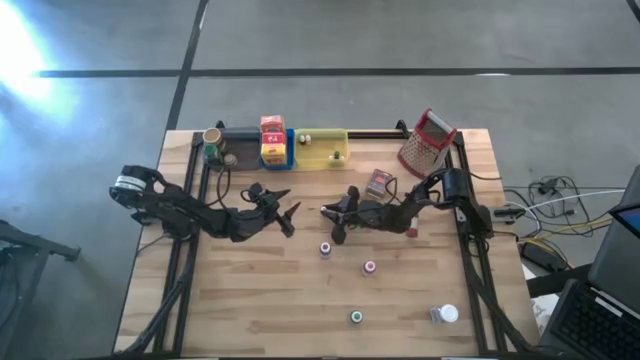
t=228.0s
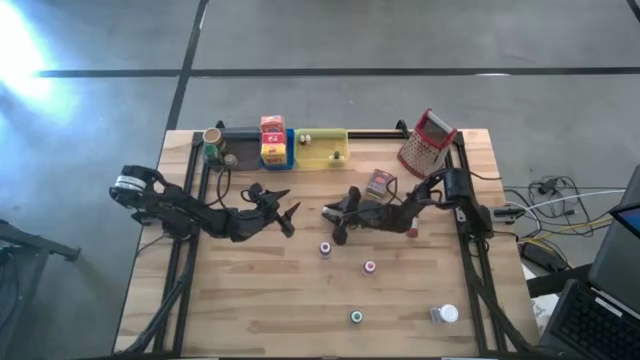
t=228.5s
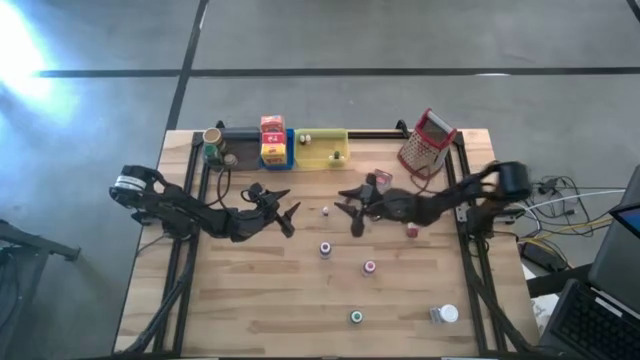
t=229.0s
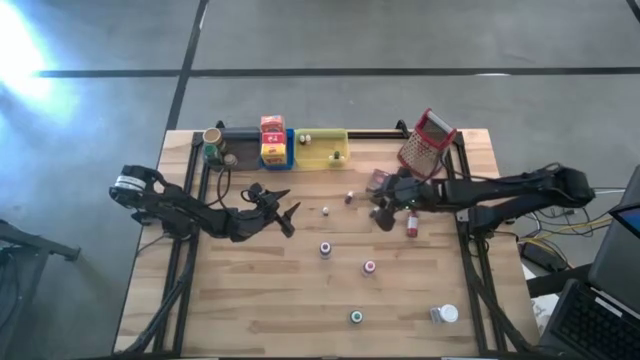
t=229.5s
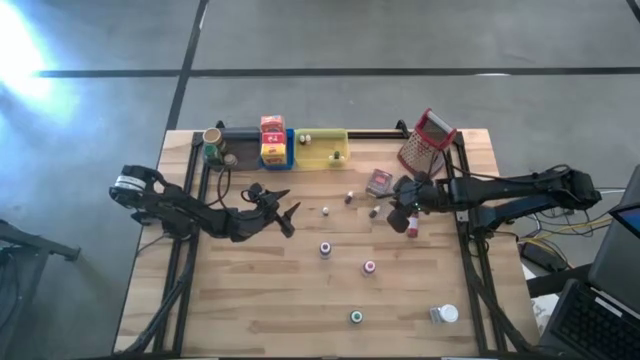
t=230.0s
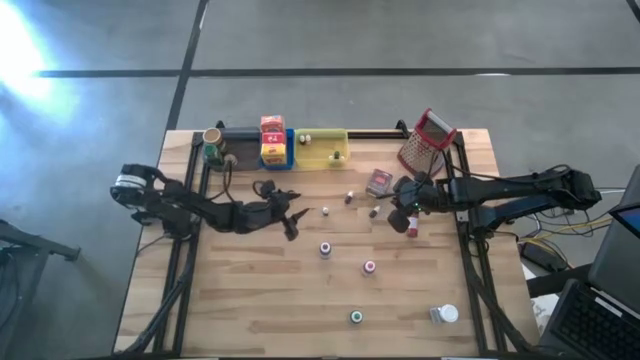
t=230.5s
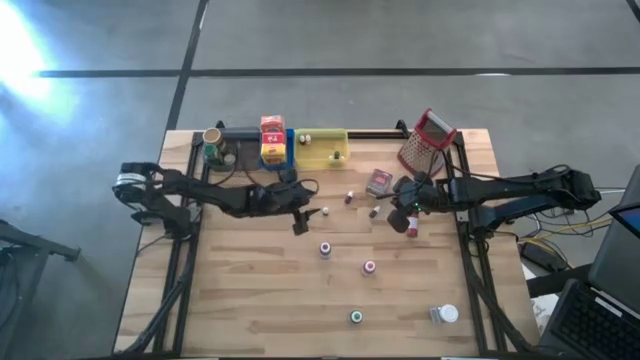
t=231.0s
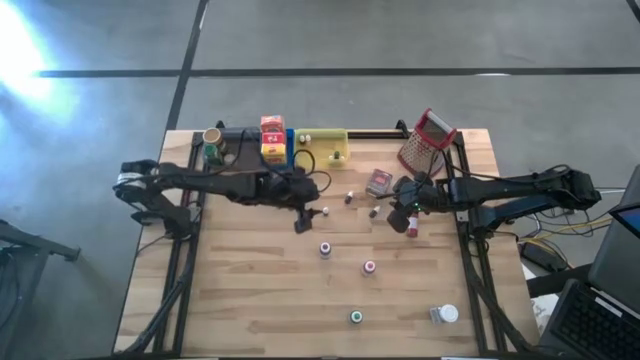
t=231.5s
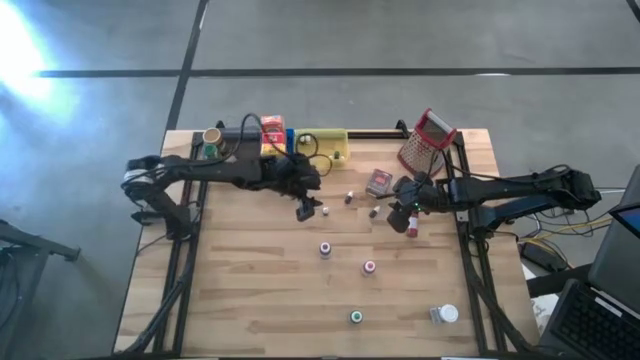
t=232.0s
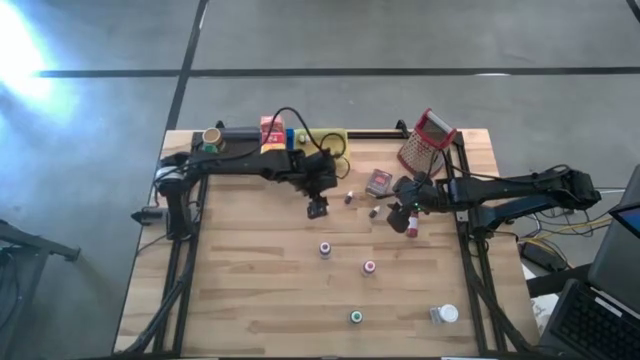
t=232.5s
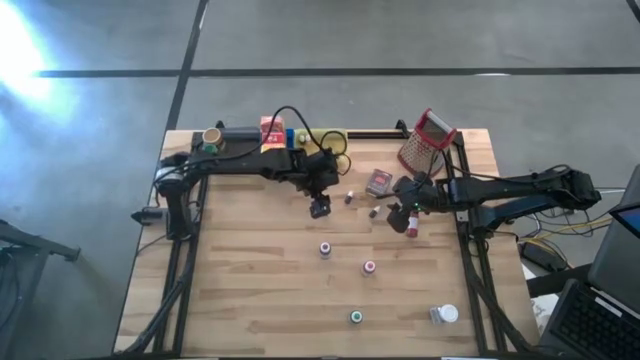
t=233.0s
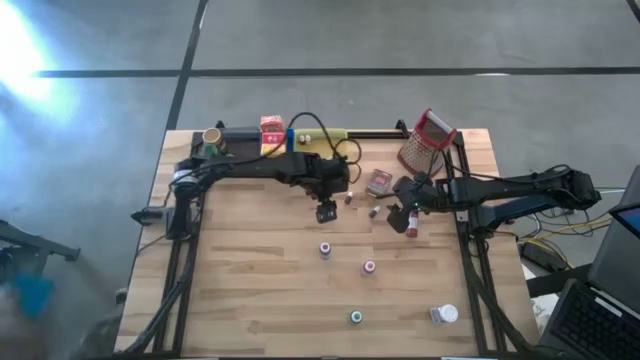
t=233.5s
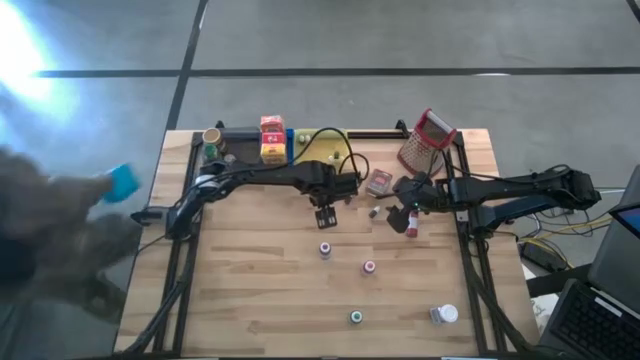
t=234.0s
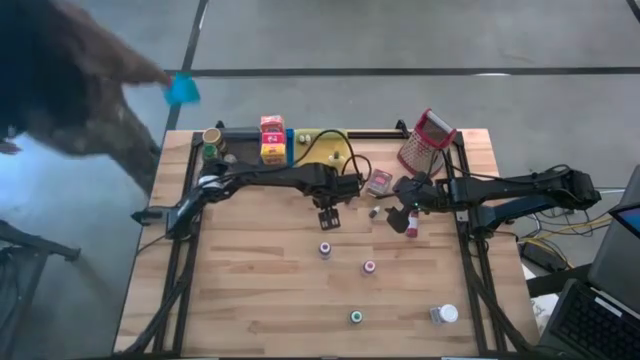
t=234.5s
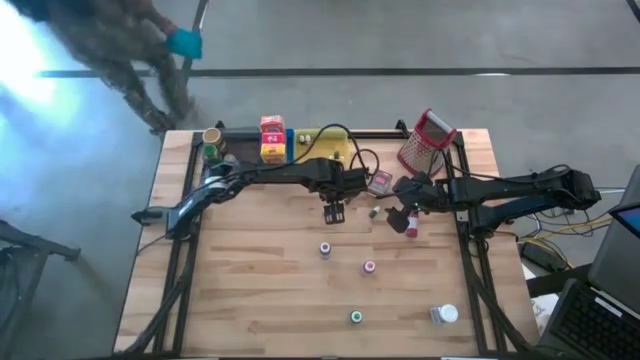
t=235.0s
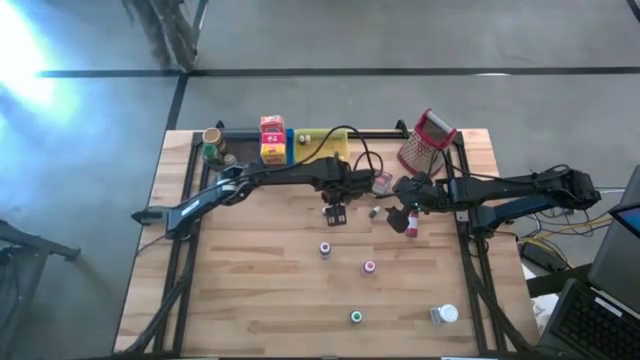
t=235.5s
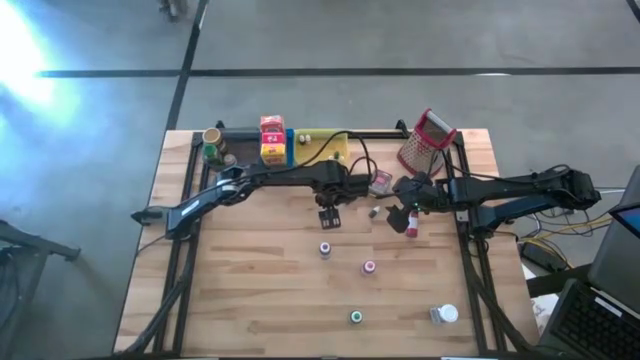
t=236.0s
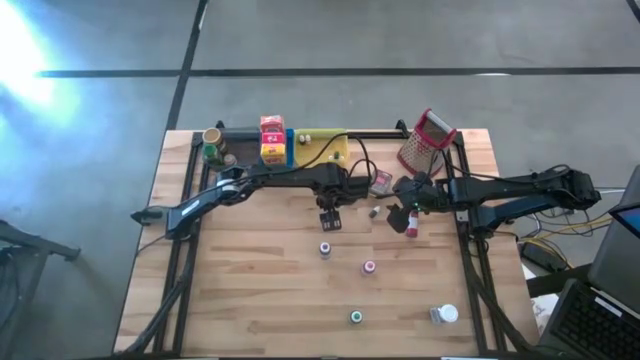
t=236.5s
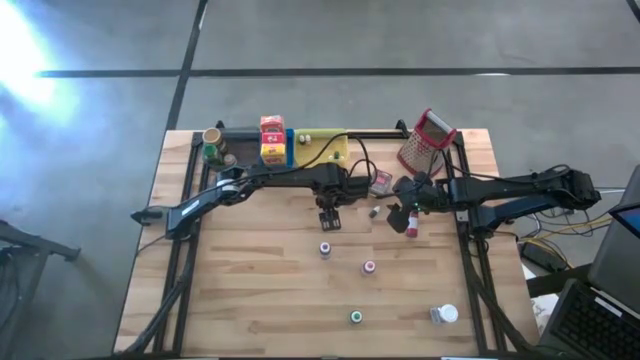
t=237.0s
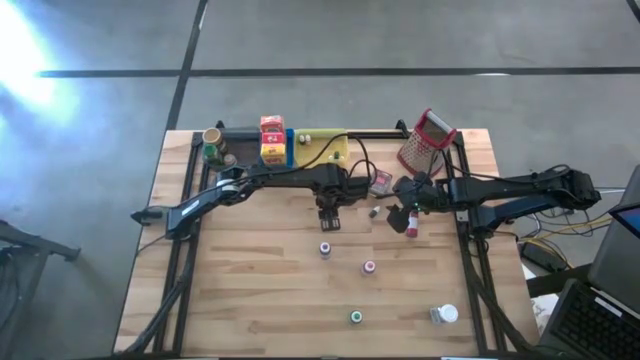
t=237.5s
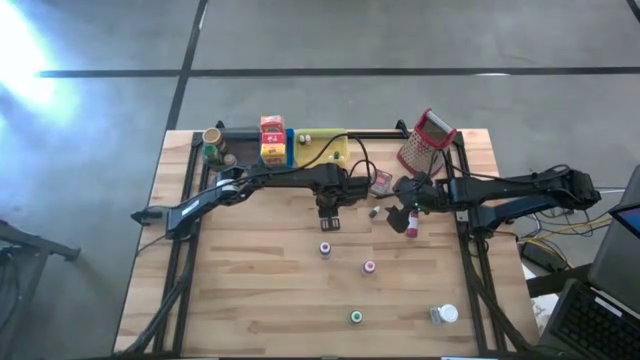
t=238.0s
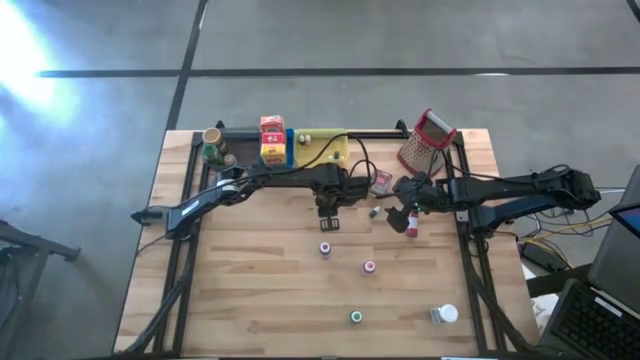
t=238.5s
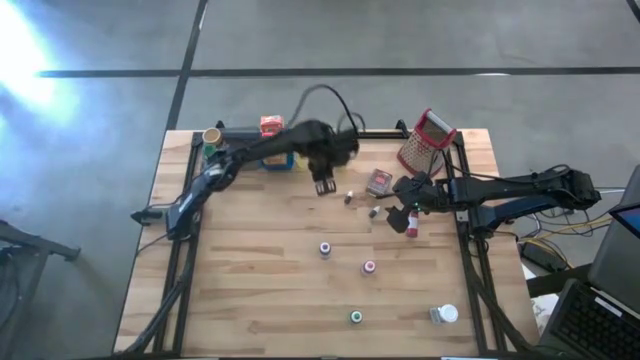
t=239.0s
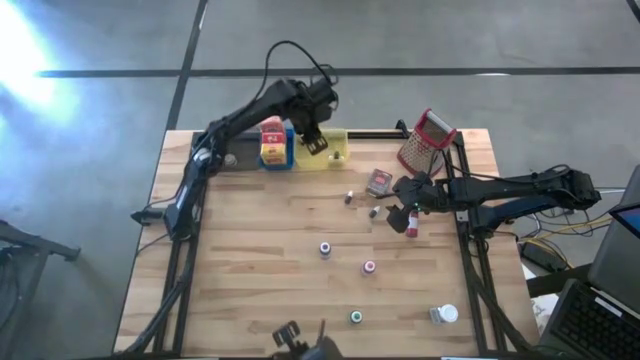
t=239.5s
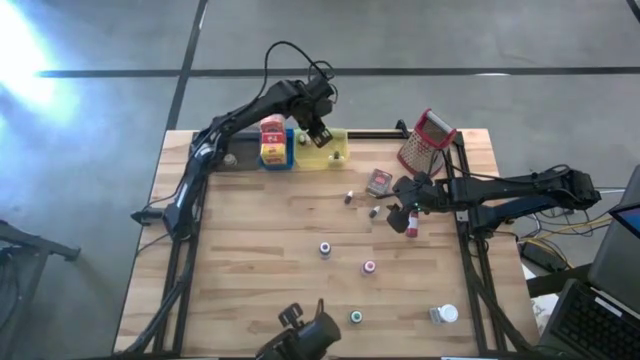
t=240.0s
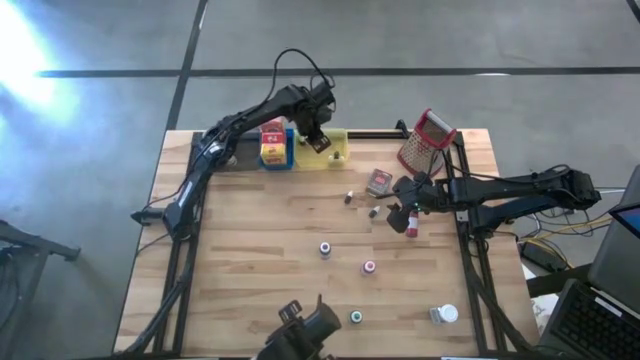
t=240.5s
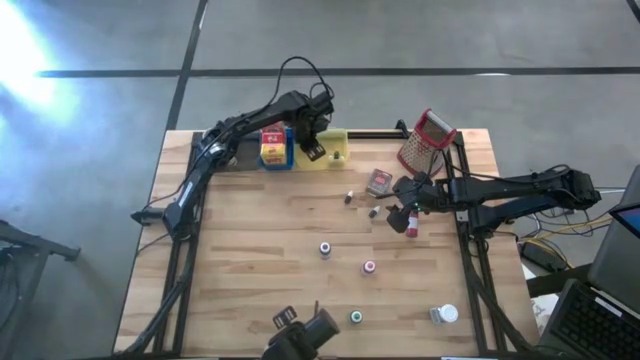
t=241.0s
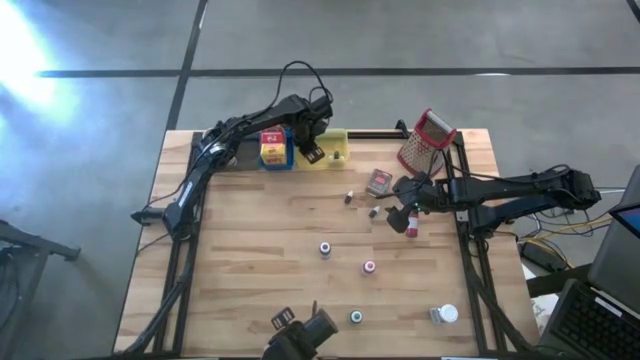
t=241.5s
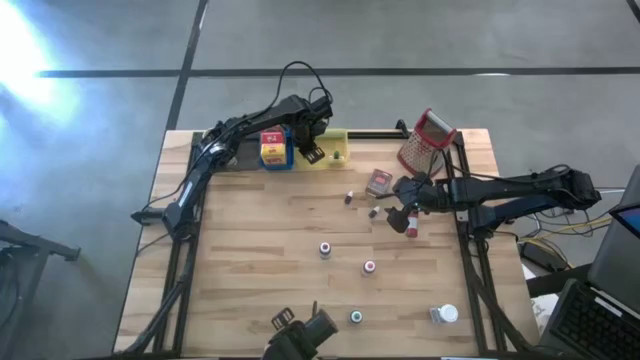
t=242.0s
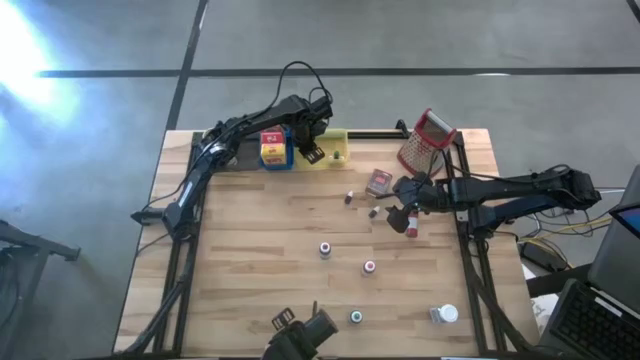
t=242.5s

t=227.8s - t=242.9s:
Task: Pick & Place Kitchen Items
Put the small light green food coloring bottle into the yellow bin

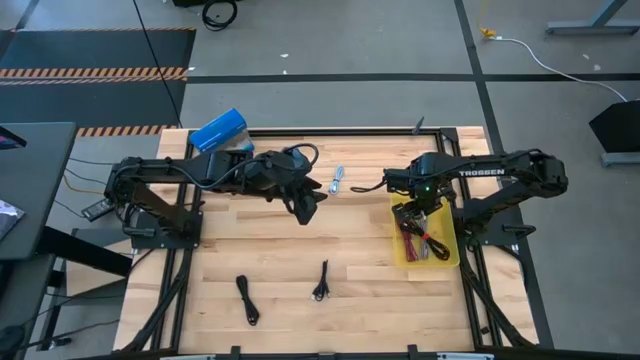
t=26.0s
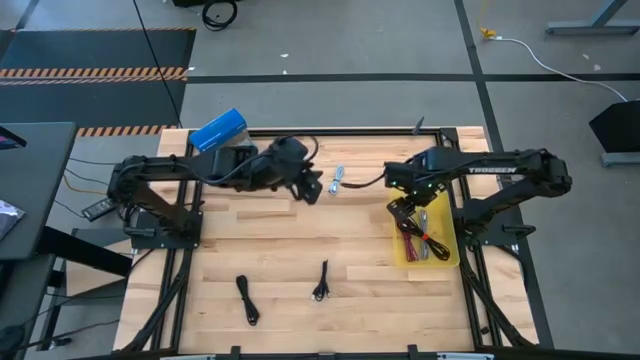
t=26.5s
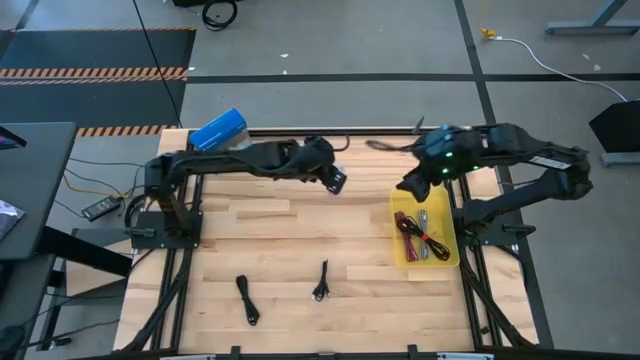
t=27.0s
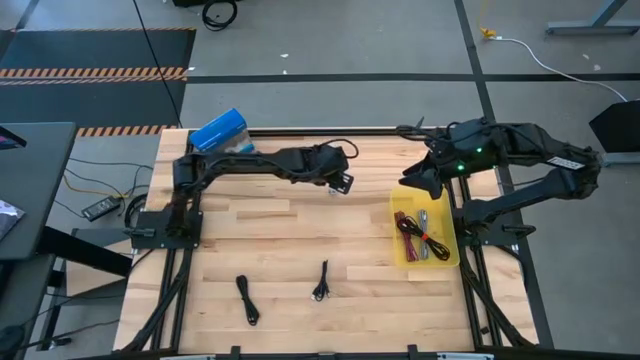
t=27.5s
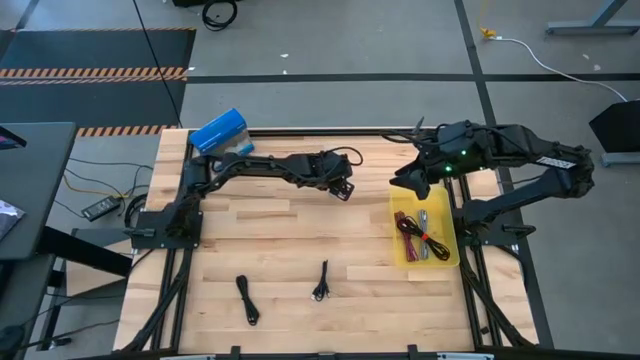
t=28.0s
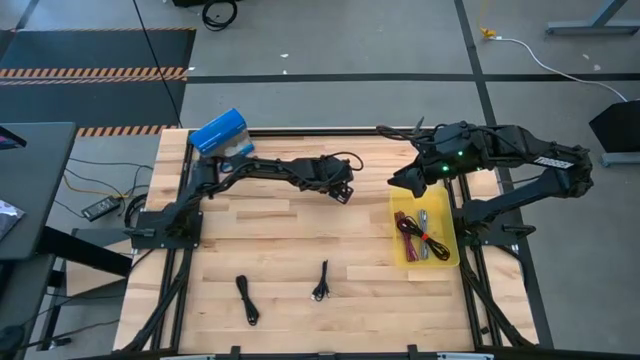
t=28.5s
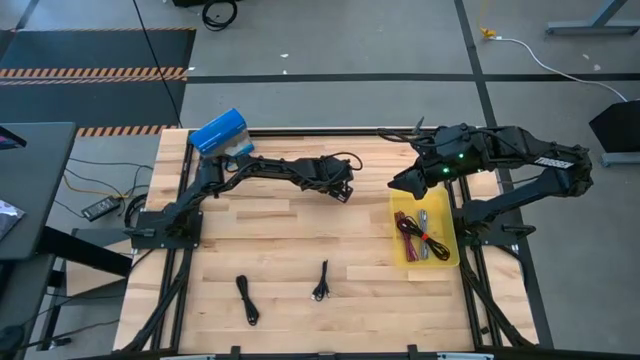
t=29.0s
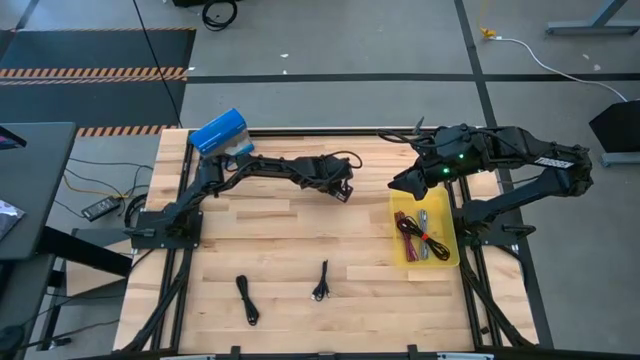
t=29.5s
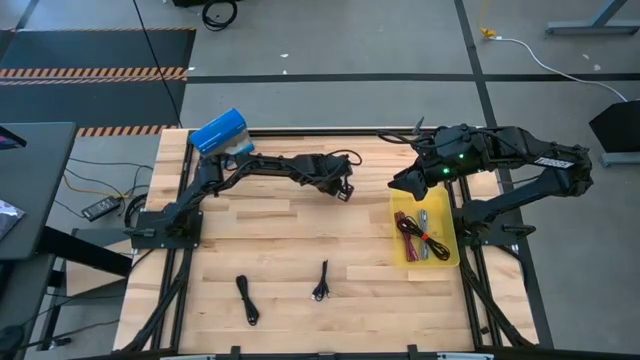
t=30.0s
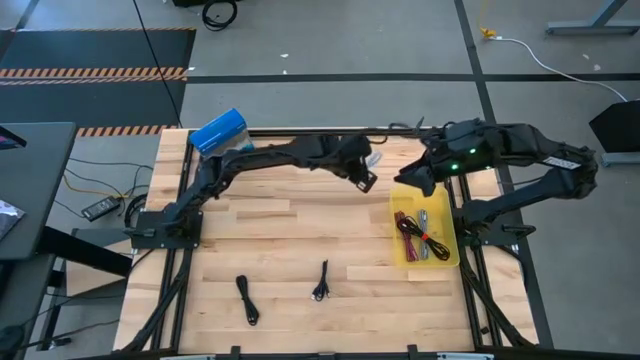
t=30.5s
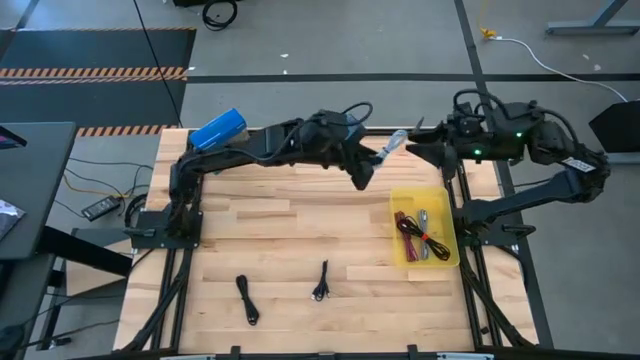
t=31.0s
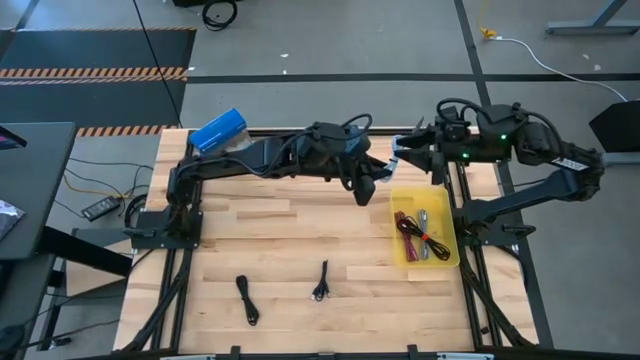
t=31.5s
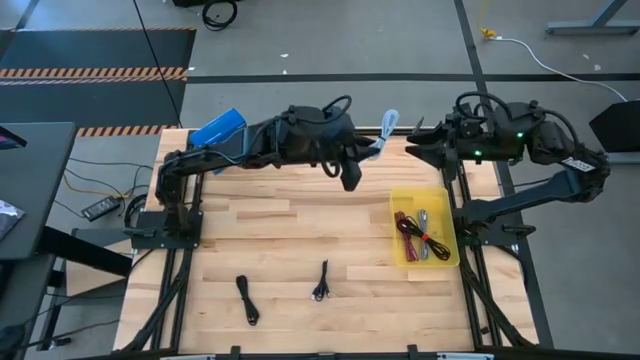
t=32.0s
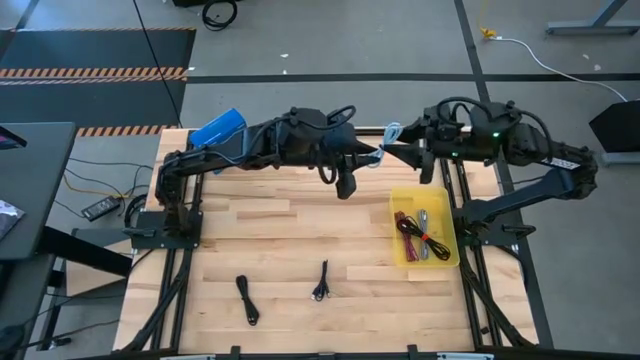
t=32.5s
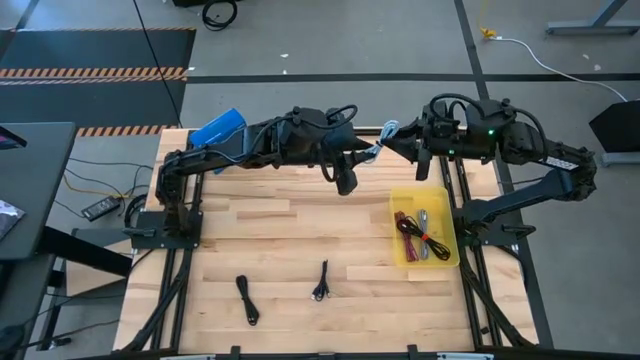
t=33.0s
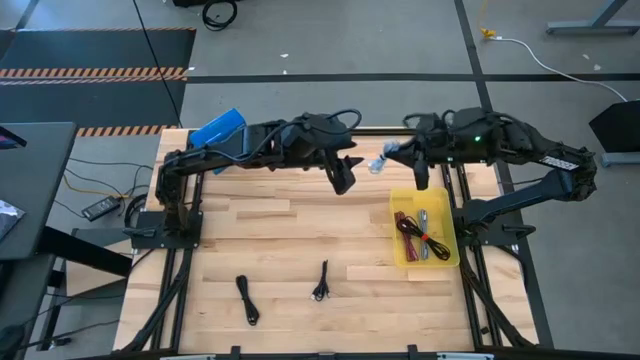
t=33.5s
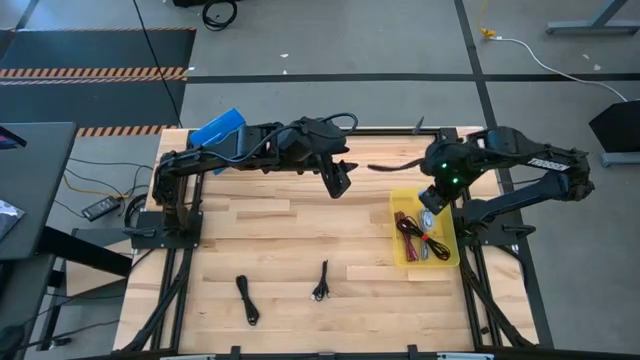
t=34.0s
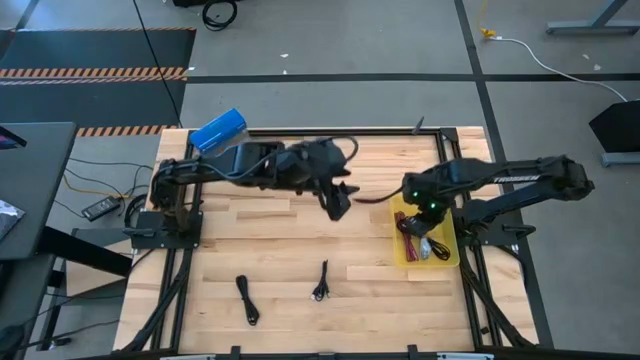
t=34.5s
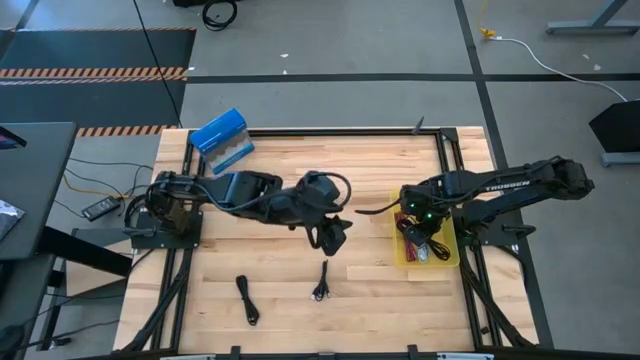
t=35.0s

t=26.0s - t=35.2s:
Task: Pick and place USB-C Cables
Put the blue cable charger into the yellow bin
